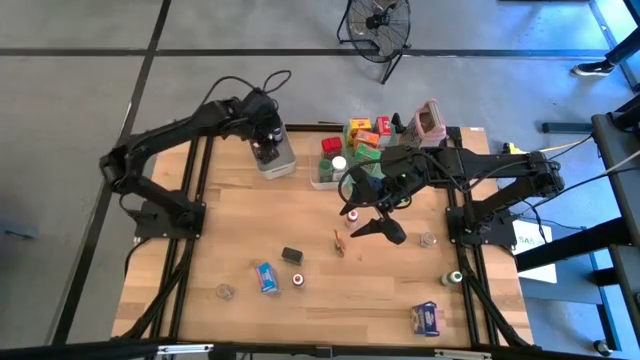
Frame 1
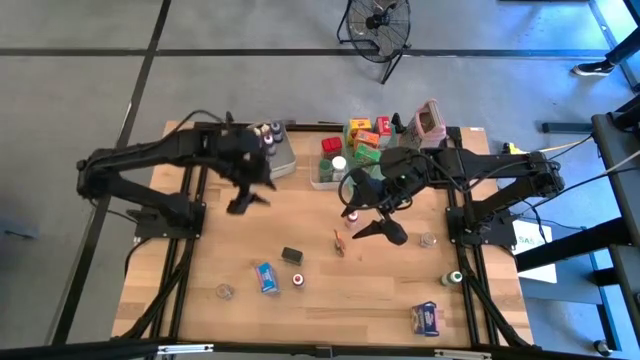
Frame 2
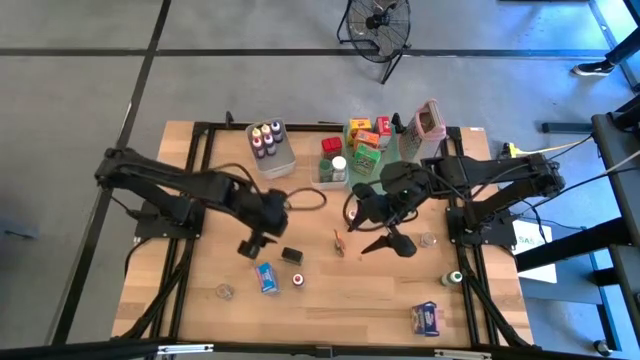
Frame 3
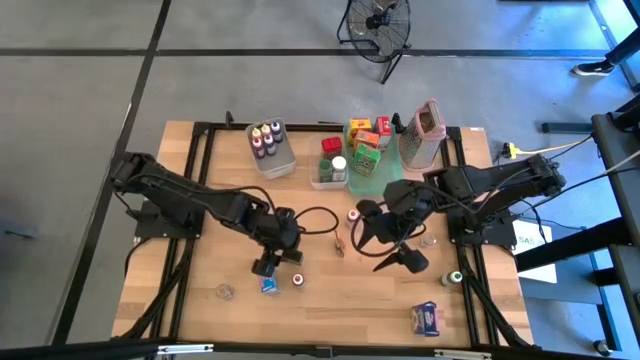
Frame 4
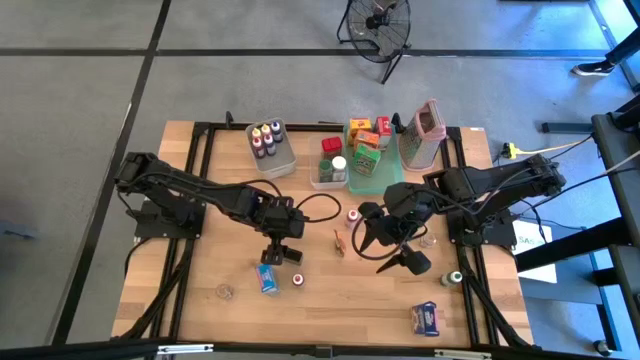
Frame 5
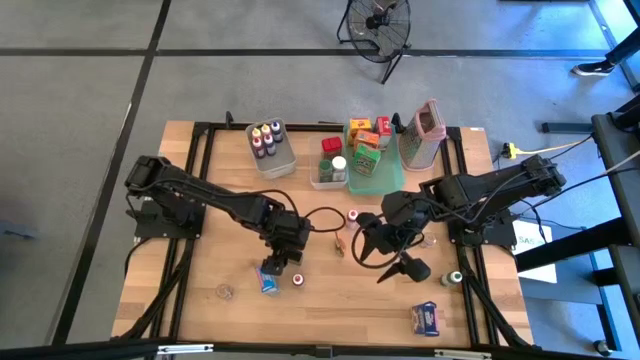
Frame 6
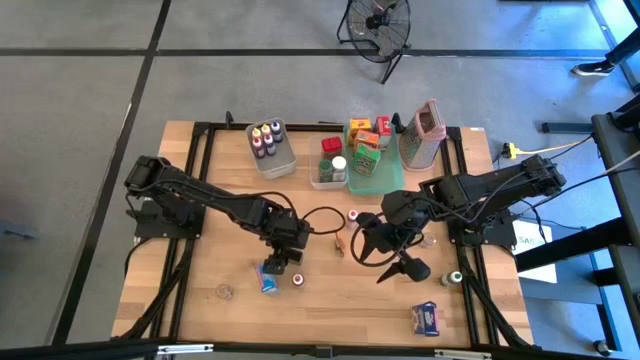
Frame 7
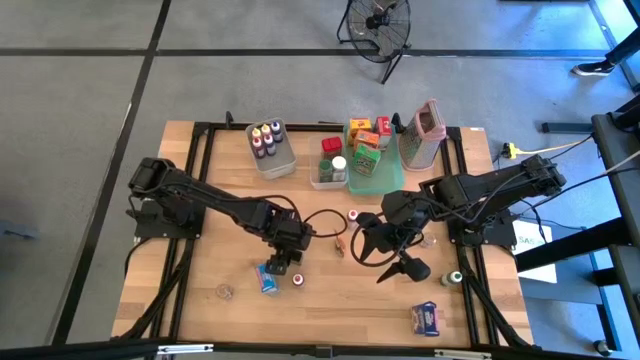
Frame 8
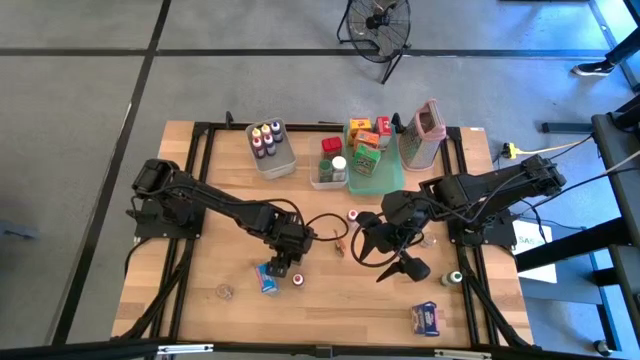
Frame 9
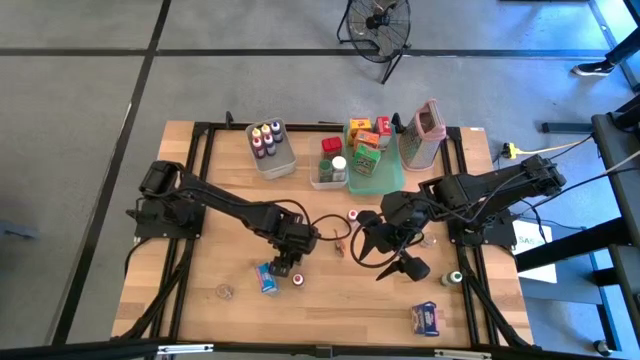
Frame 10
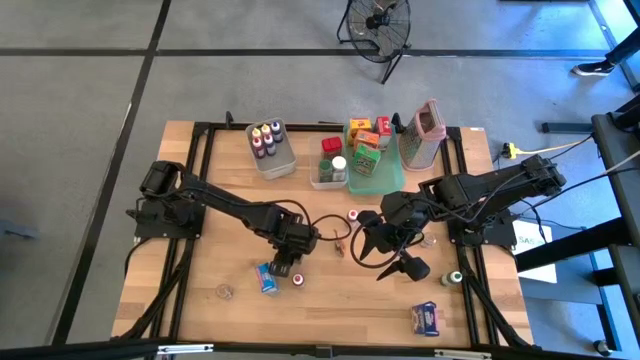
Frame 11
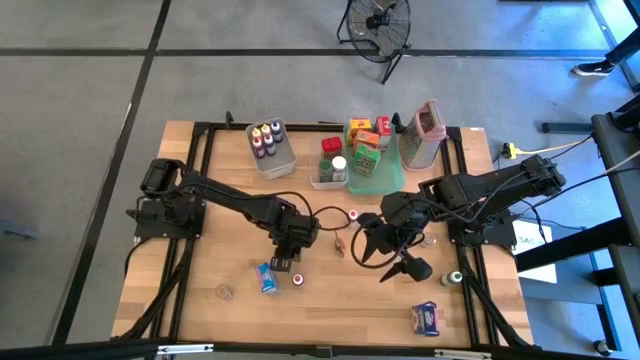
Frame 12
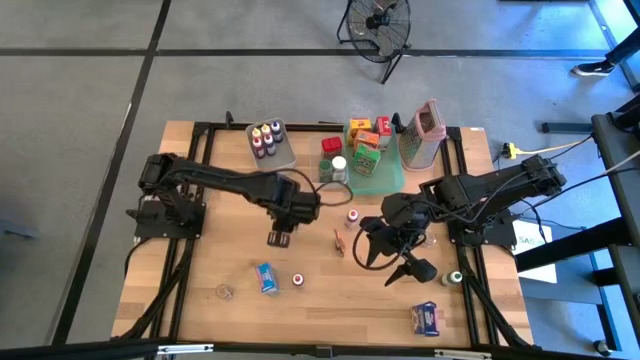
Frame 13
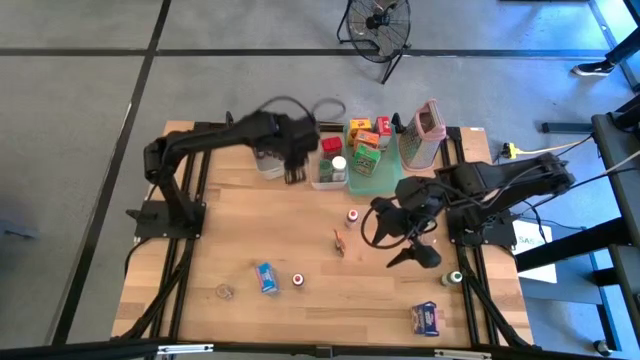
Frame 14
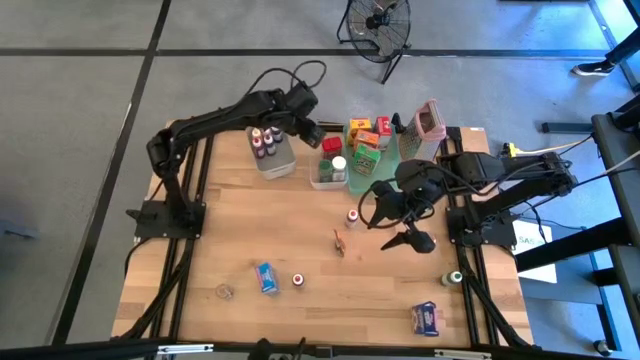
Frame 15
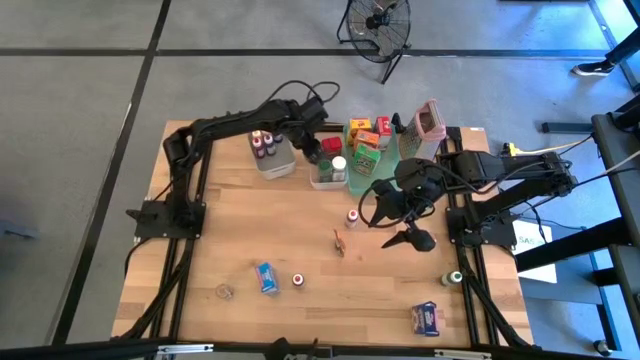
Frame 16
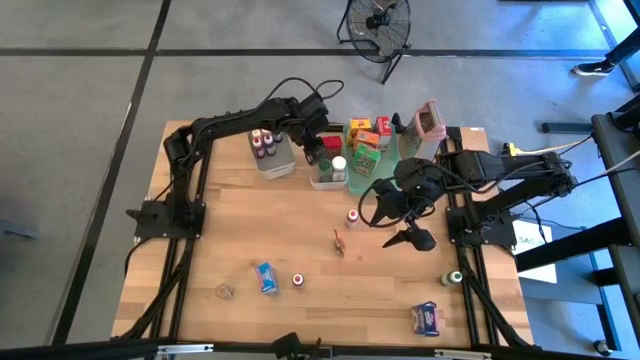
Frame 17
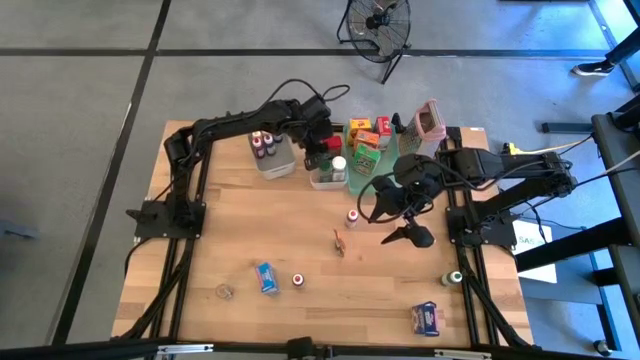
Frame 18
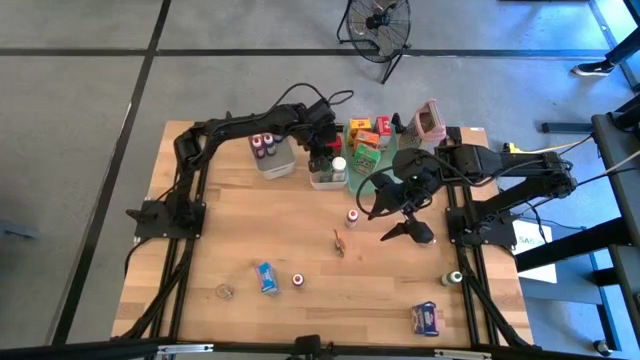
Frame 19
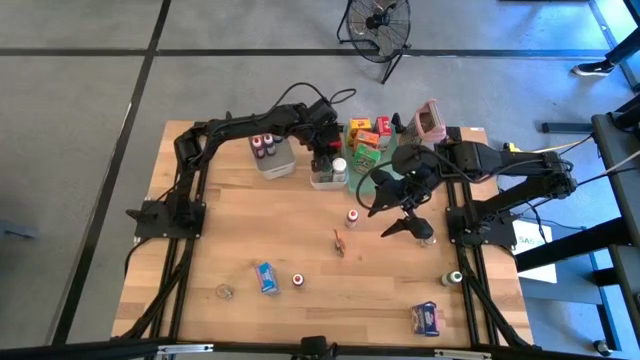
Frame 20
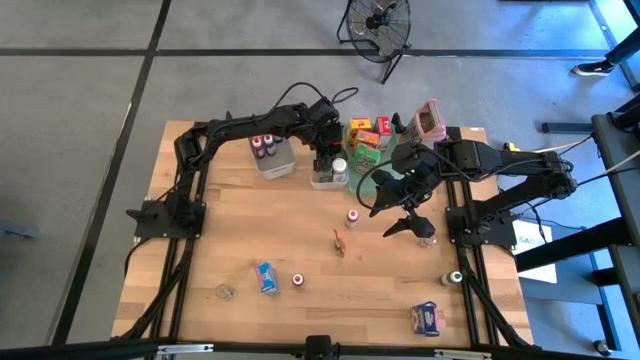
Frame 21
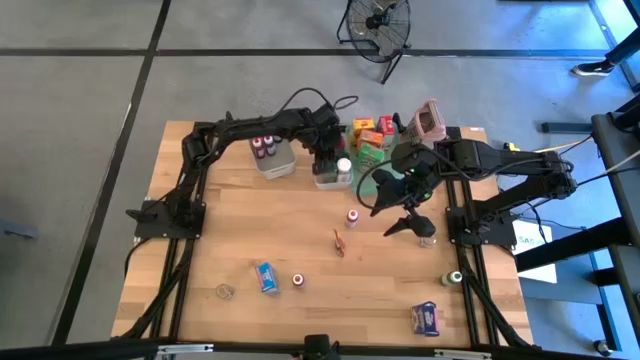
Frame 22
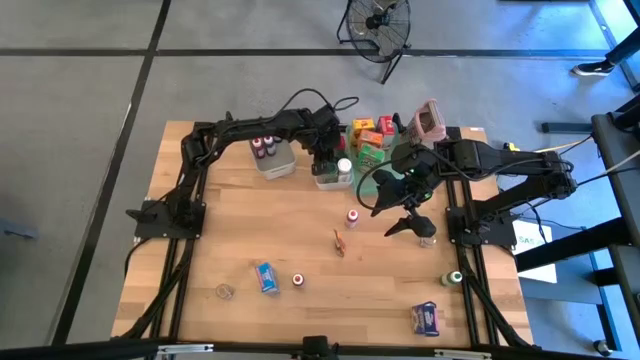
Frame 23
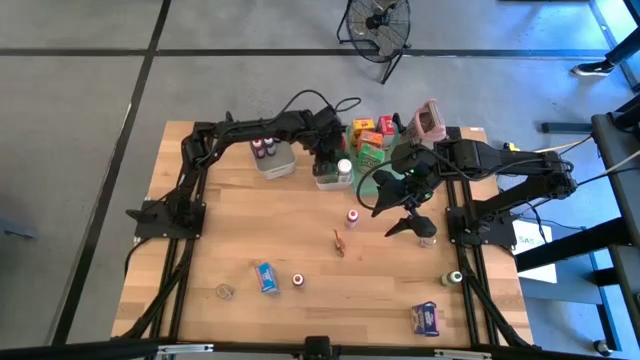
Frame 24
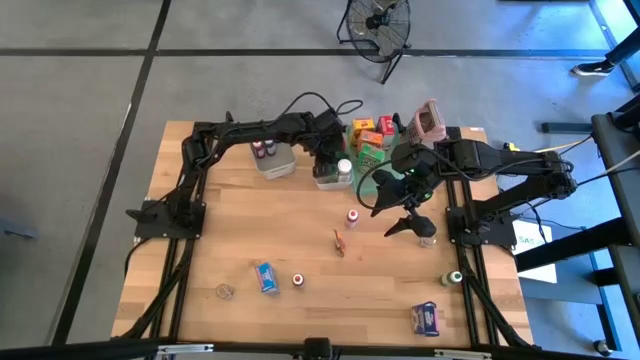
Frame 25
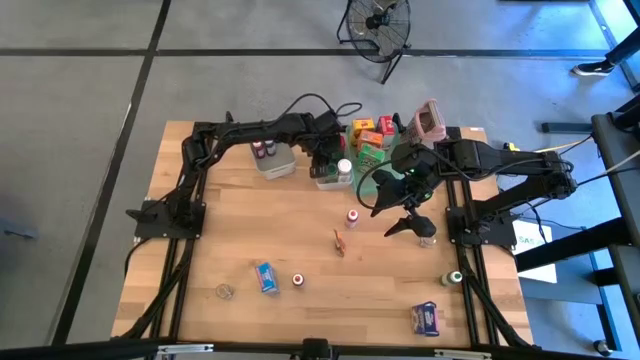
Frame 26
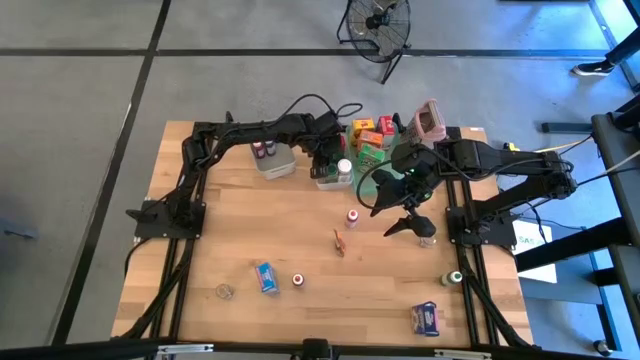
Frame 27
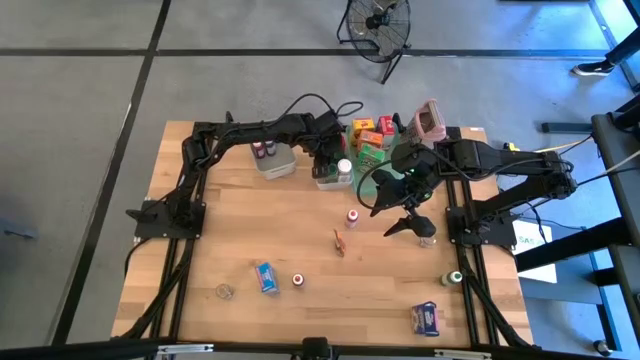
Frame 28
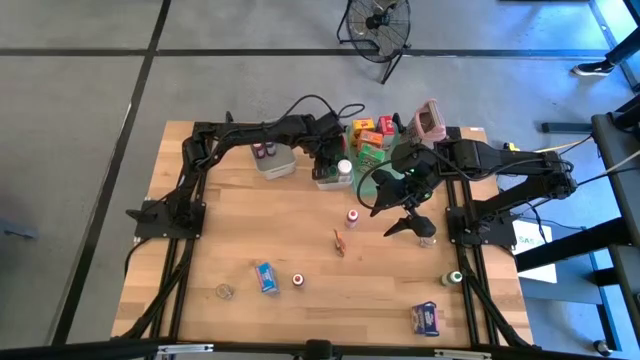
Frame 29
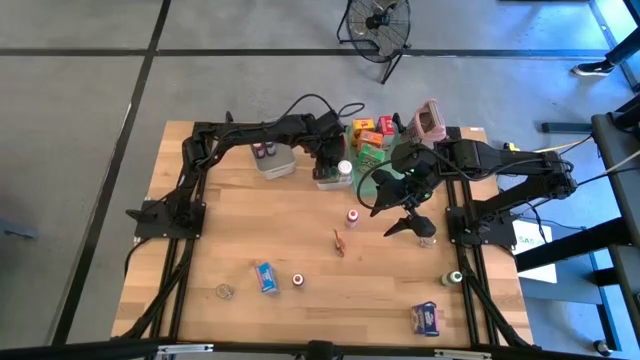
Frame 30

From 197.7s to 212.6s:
Task: Pick & Place Kitchen Items
Put the black seasoning can into the white bin

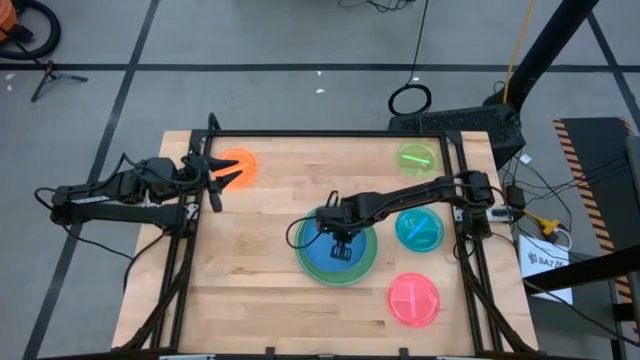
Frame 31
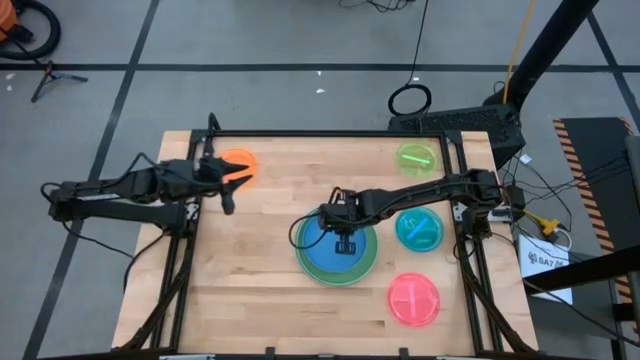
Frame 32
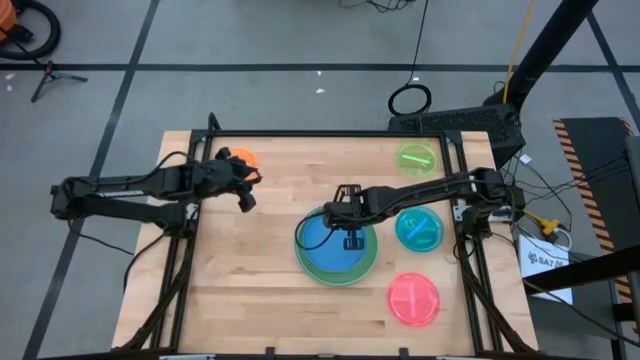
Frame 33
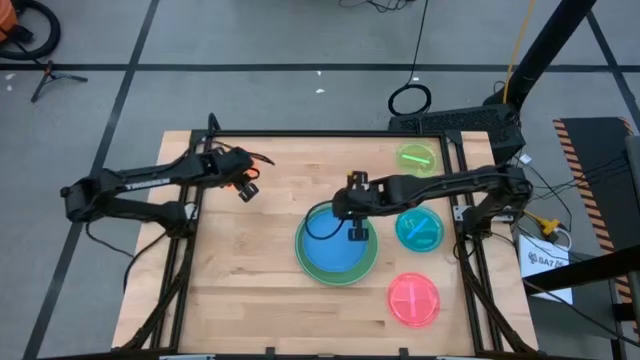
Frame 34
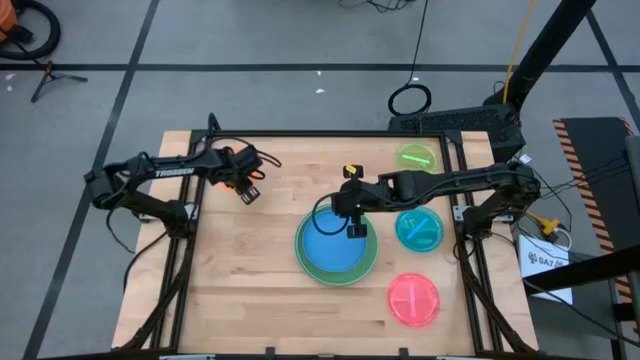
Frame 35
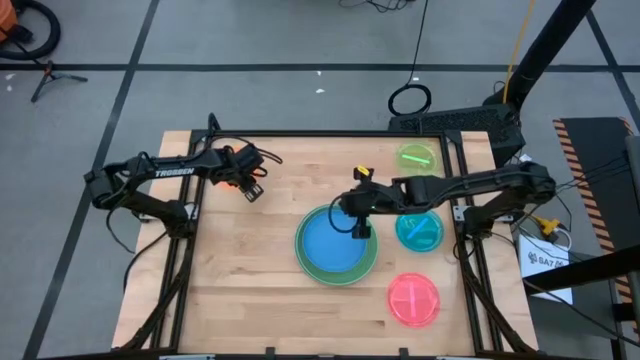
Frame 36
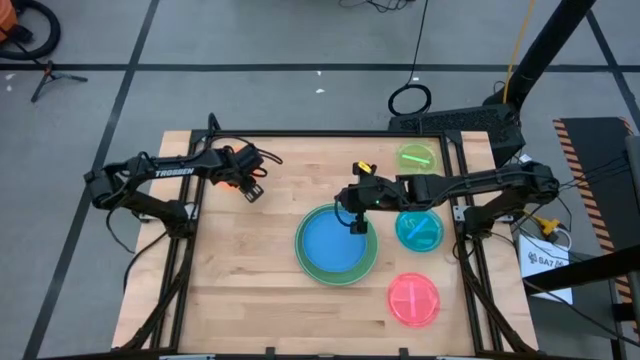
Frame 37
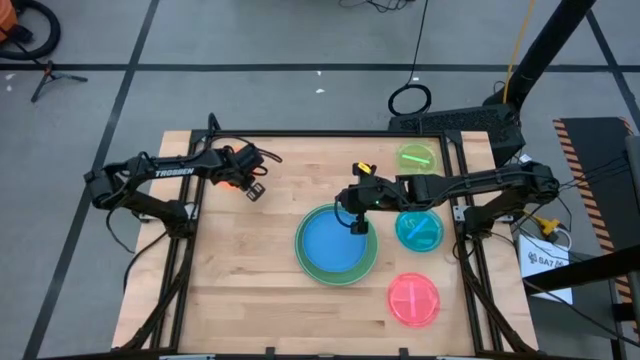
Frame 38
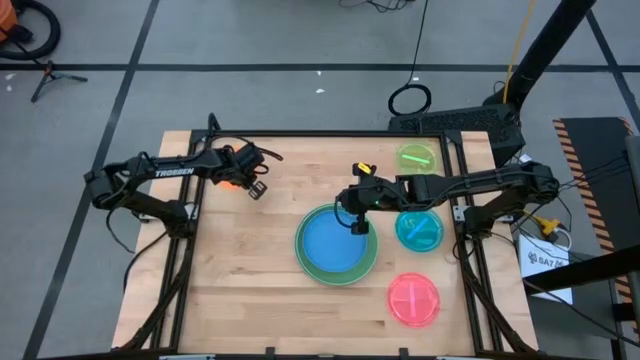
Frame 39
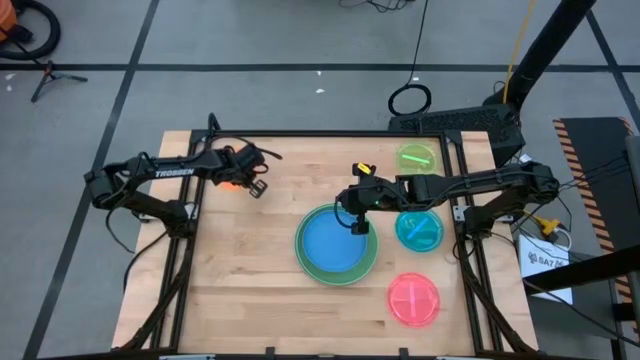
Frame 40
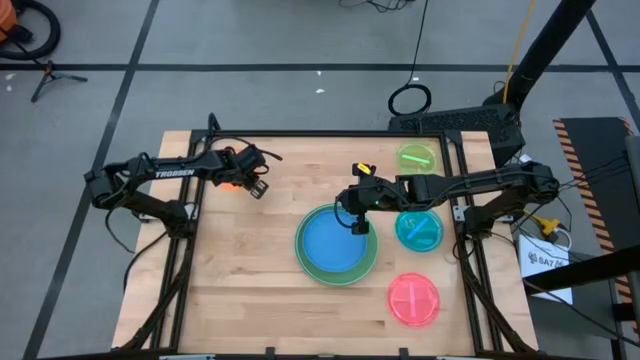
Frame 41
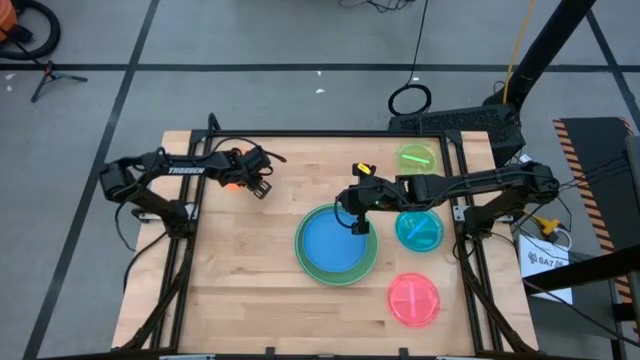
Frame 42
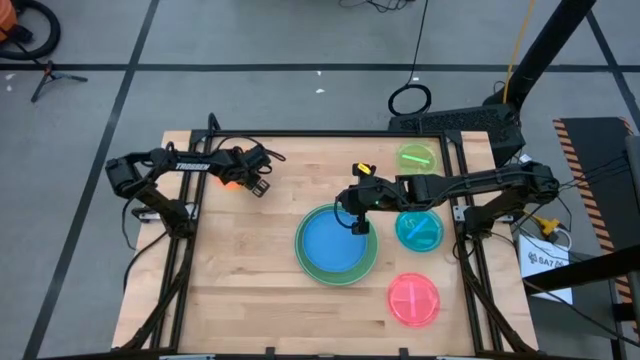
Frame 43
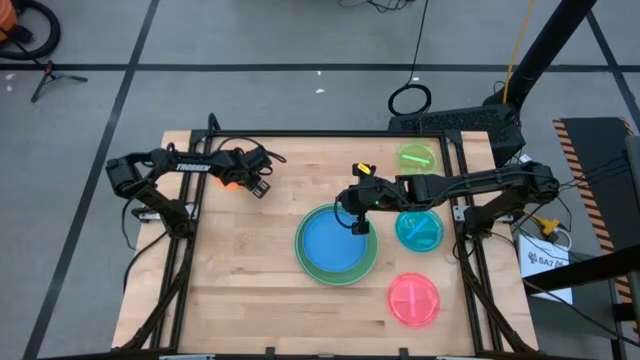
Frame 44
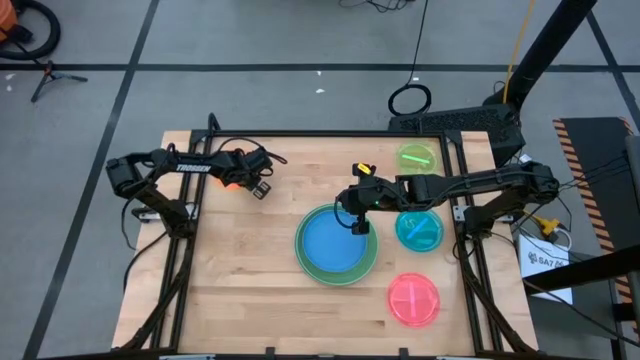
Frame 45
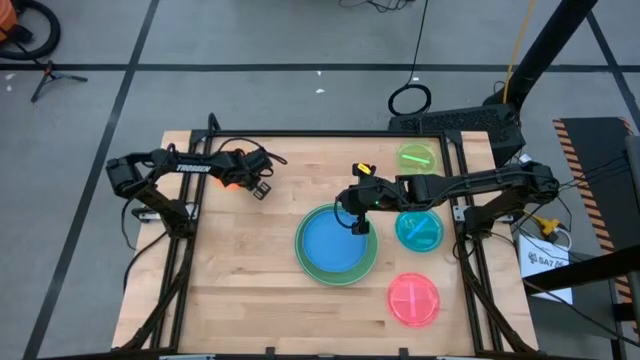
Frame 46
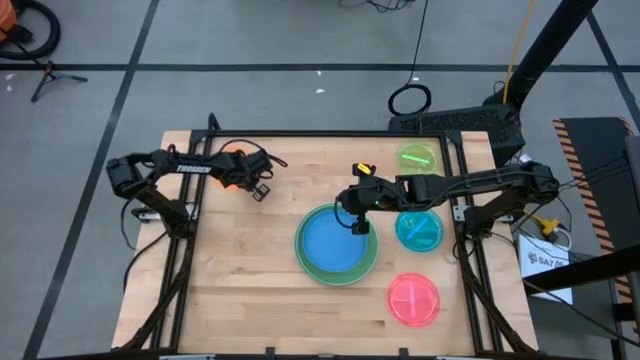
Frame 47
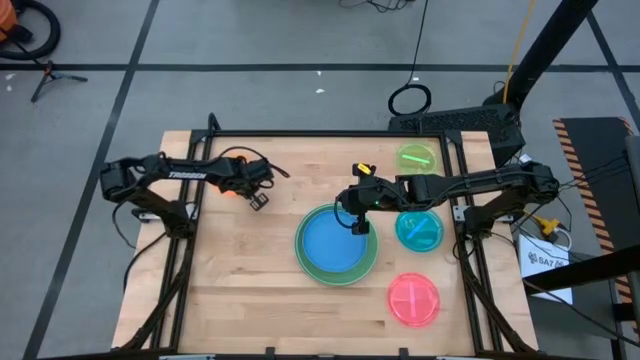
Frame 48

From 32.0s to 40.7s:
Task: Stack plastic plates
Stack the orange plate on top of the dark blue plate
